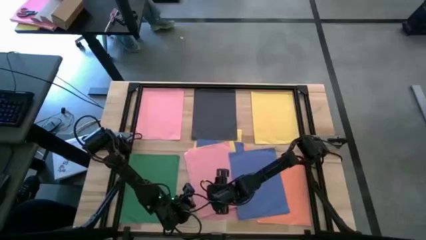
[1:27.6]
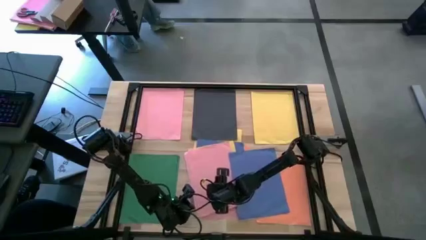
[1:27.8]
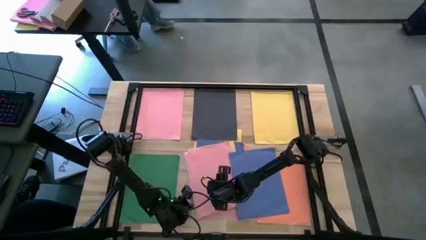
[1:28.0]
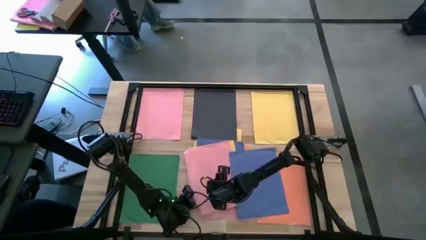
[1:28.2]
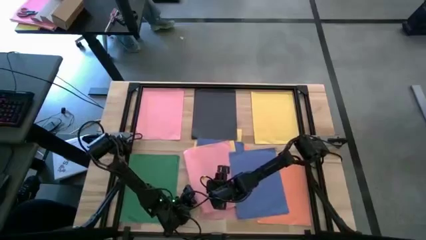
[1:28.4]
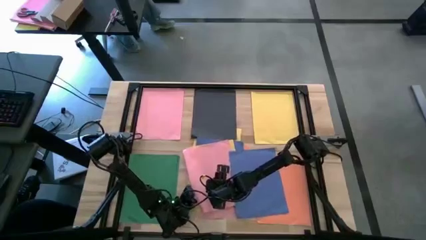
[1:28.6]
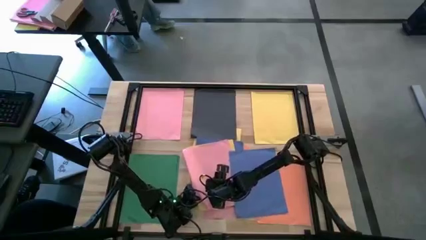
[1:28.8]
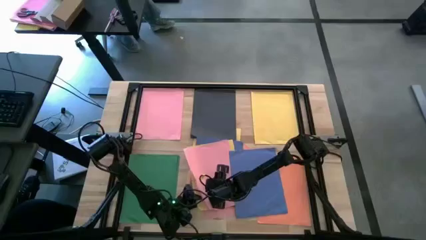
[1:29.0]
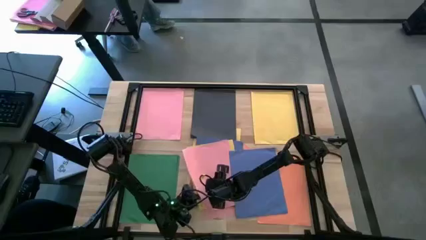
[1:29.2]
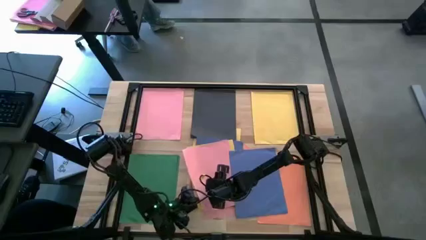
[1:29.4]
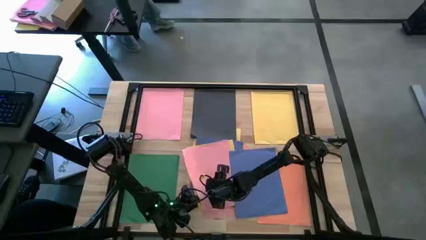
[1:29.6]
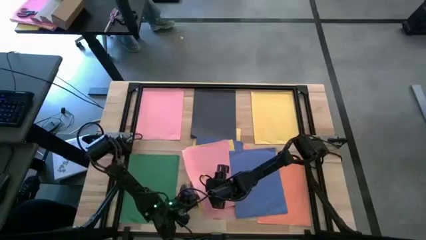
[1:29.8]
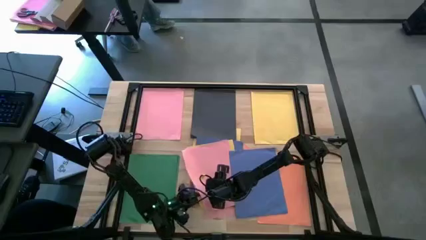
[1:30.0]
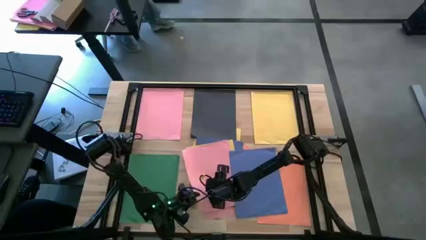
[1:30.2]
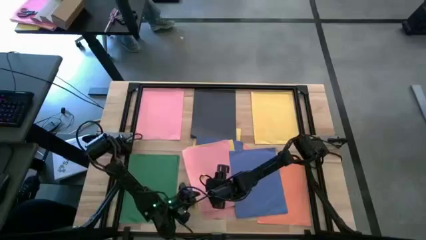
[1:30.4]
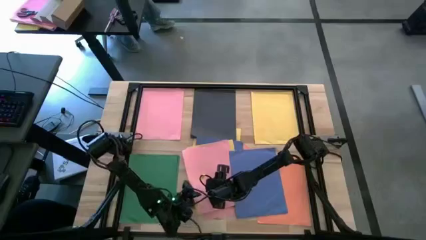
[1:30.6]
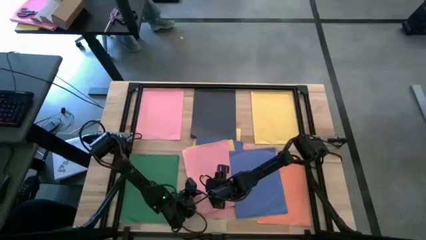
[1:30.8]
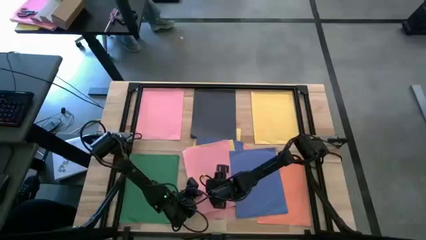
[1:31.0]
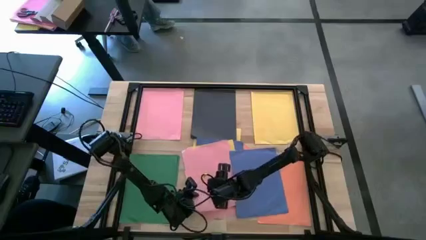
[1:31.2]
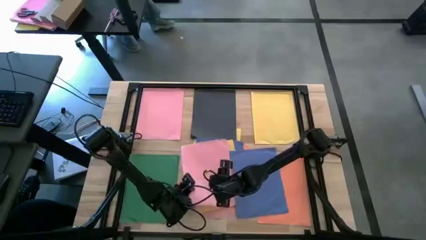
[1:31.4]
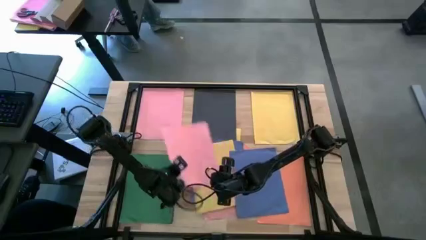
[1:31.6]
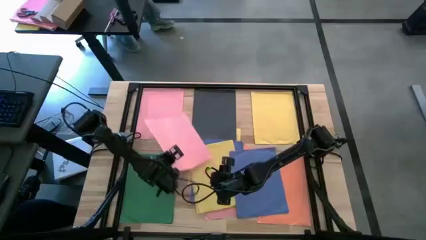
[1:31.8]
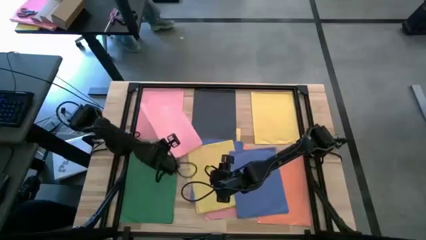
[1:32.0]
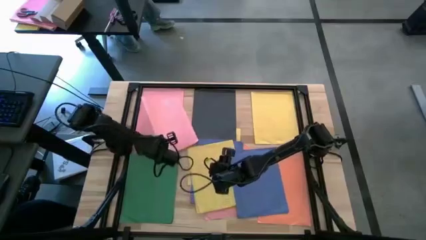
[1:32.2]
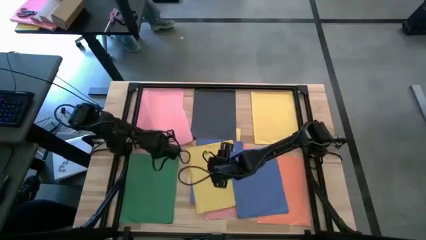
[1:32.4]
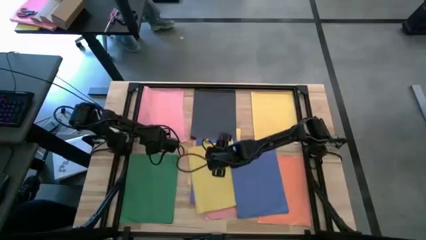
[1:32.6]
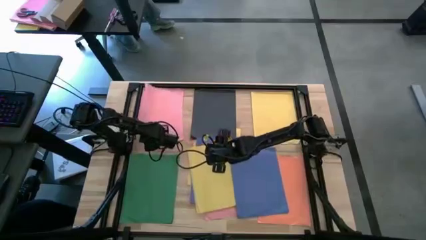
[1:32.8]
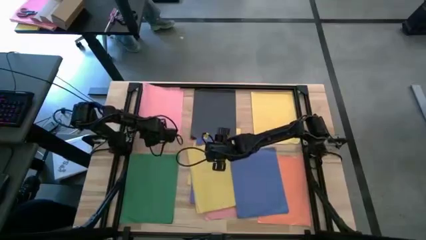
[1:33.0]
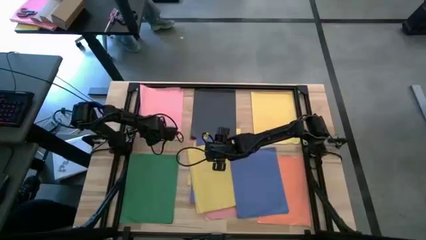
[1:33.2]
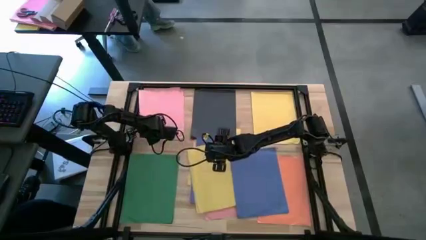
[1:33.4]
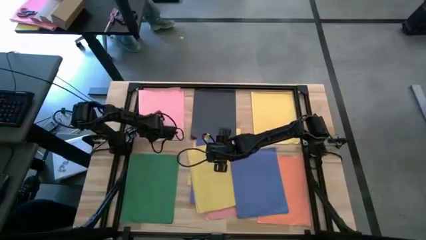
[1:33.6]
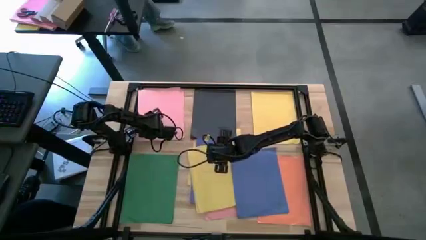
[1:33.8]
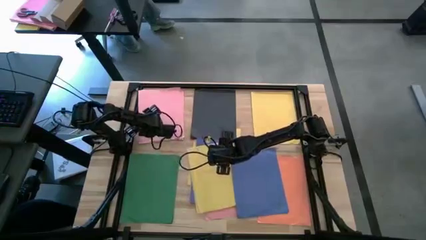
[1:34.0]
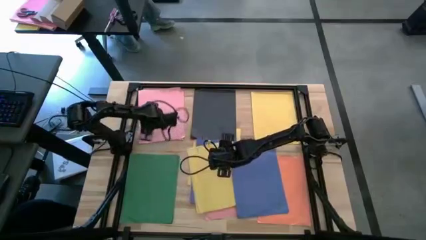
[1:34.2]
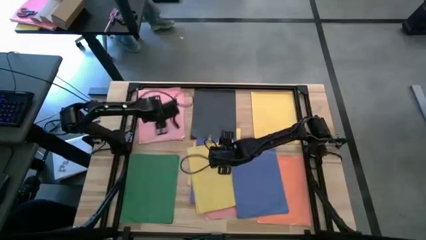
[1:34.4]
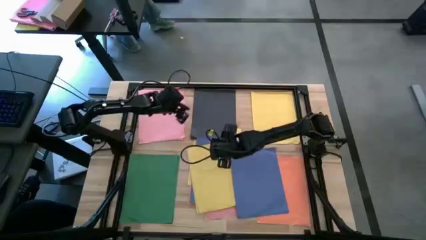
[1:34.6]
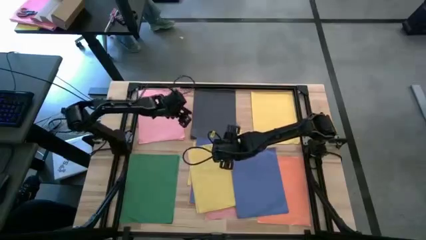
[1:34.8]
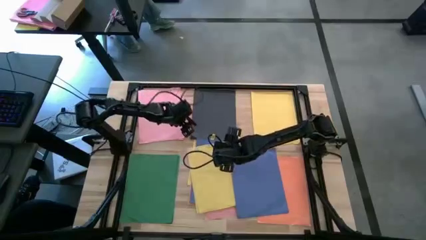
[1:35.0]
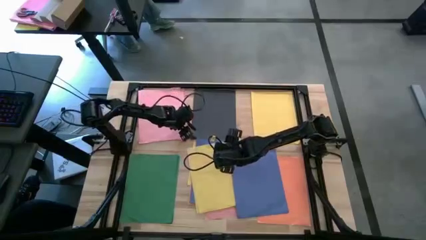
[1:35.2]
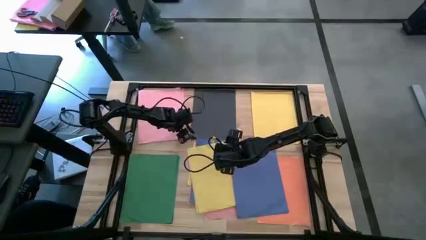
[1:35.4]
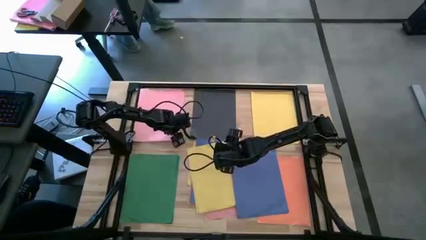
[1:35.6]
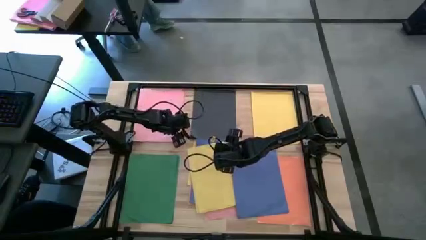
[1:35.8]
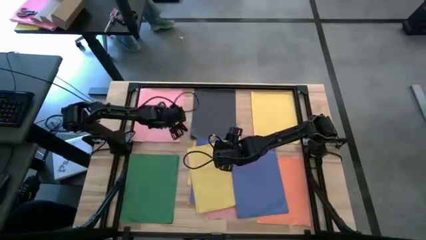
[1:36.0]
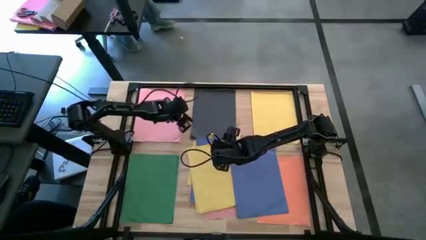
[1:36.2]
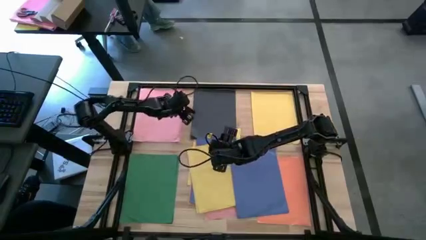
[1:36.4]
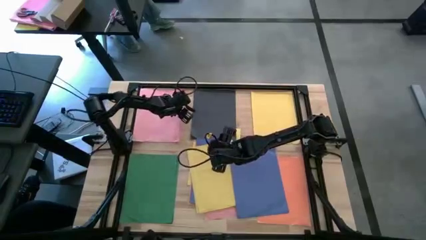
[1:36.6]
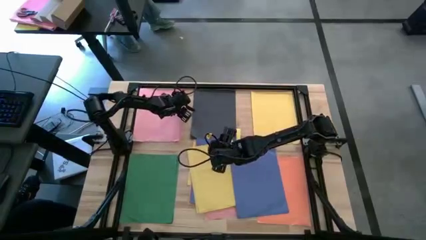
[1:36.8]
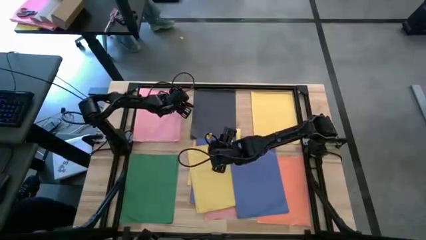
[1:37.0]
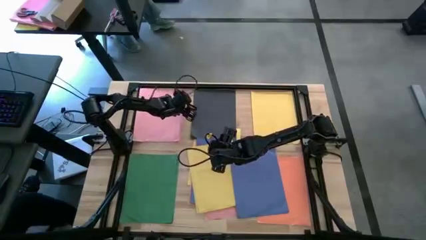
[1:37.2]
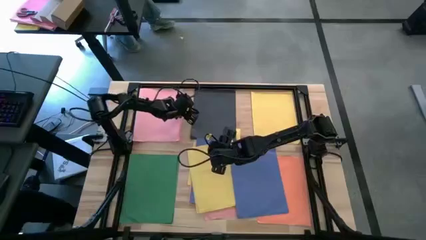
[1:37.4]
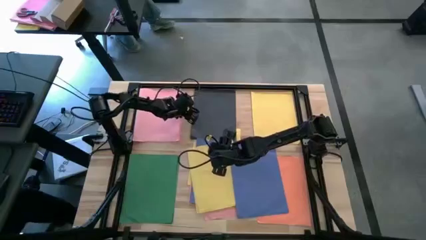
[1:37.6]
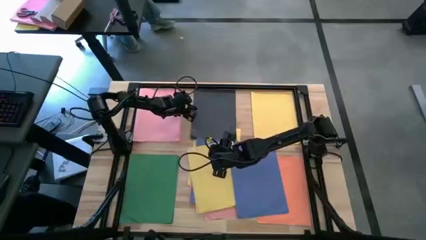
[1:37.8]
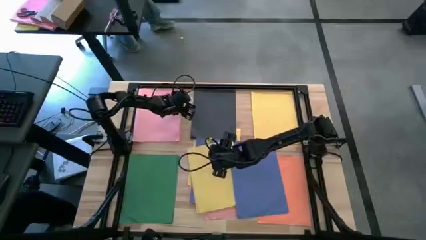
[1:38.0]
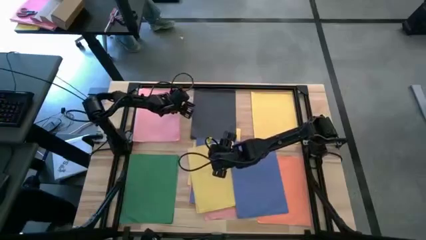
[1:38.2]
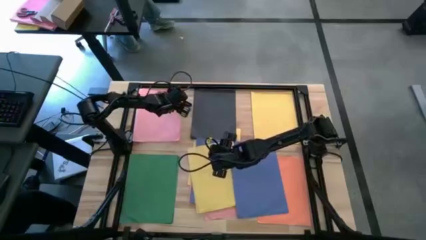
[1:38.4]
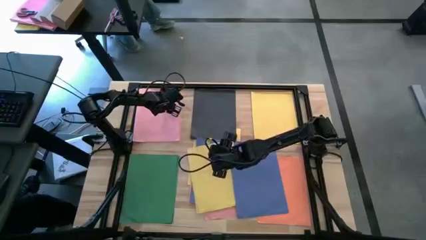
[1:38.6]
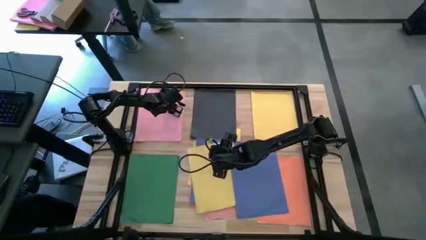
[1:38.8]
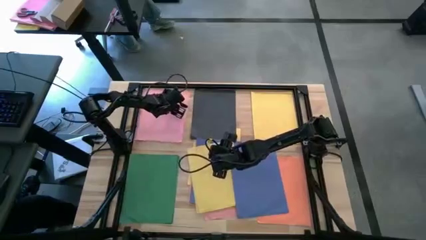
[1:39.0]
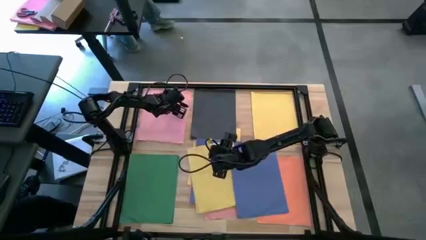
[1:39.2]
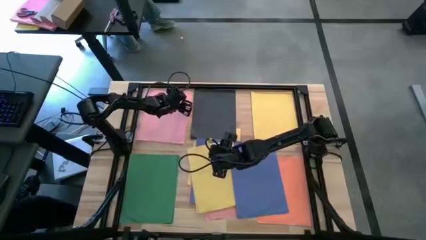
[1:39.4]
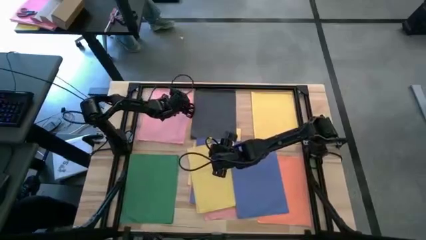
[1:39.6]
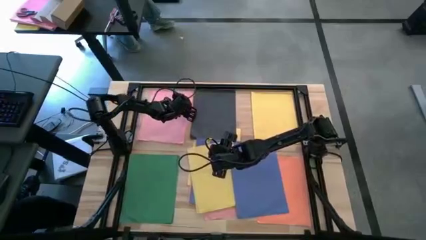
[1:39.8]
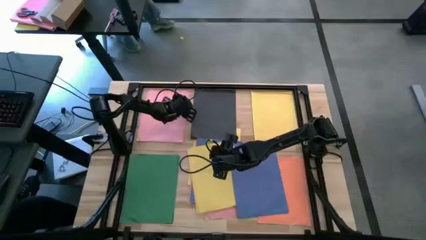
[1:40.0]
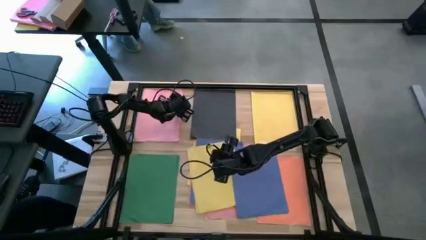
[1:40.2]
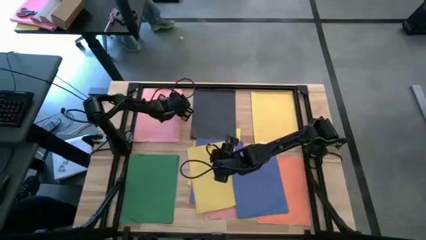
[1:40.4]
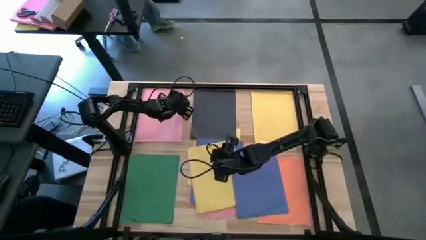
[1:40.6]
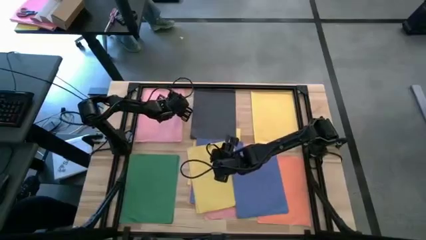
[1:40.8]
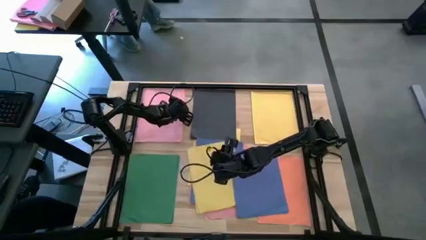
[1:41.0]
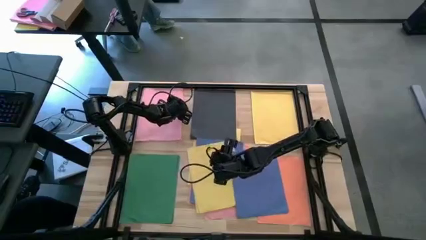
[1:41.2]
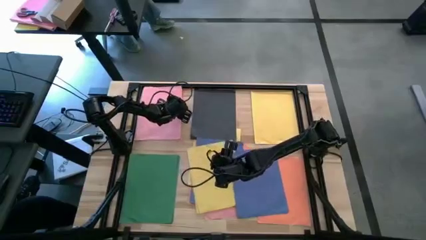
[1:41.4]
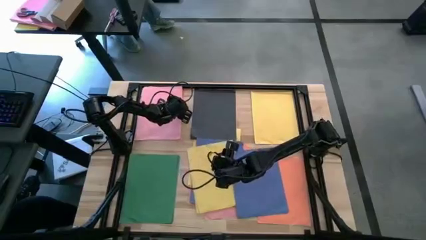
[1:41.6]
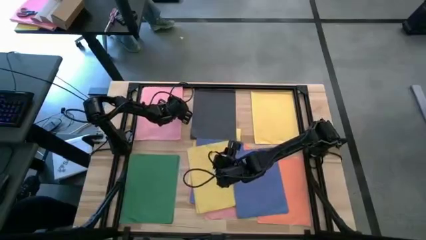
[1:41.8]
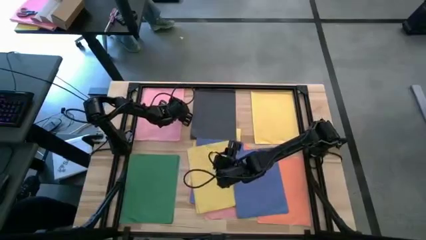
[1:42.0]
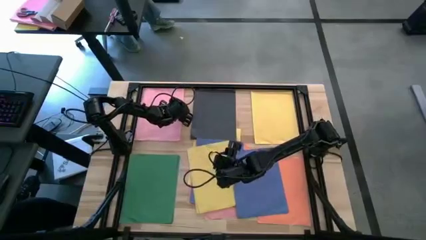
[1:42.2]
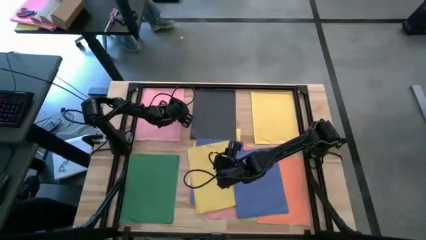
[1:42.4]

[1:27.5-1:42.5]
Task: Organize paper
Stack the pink color paper on top of the other pink color paper
